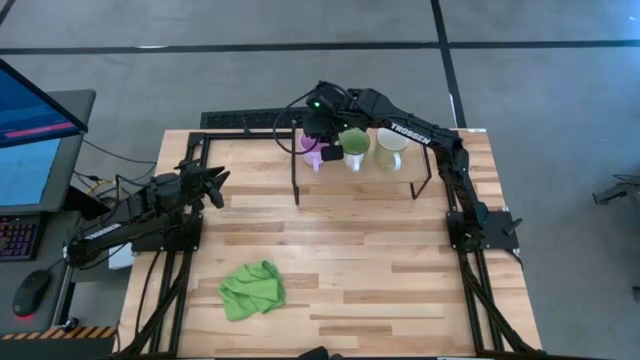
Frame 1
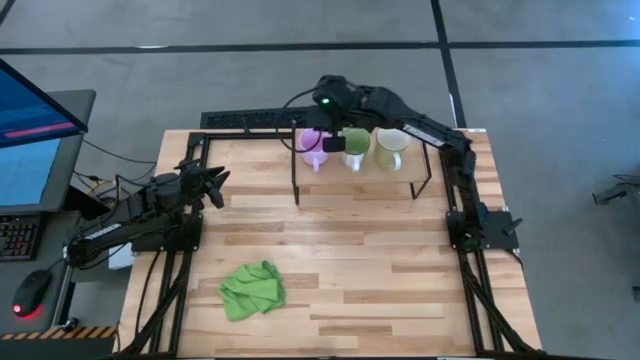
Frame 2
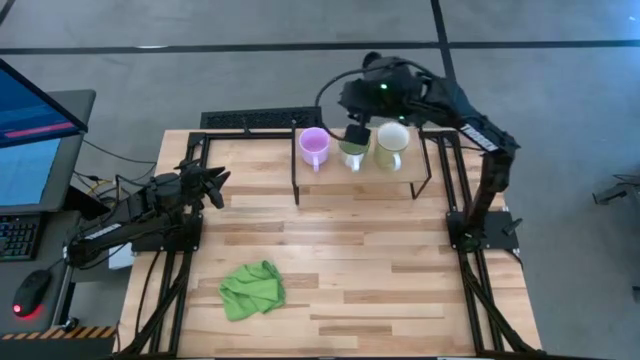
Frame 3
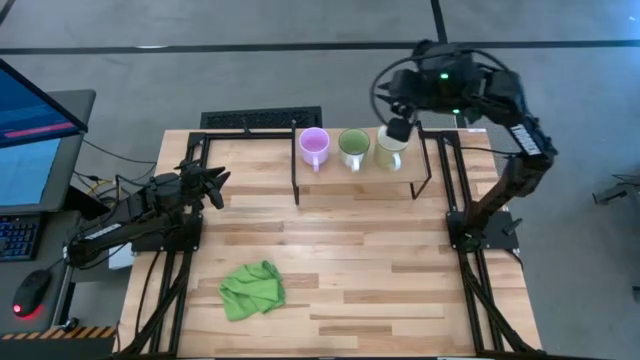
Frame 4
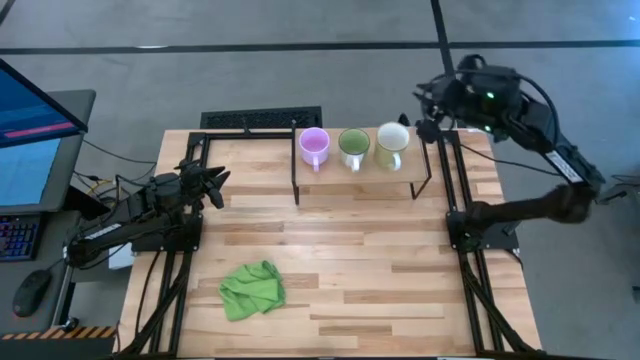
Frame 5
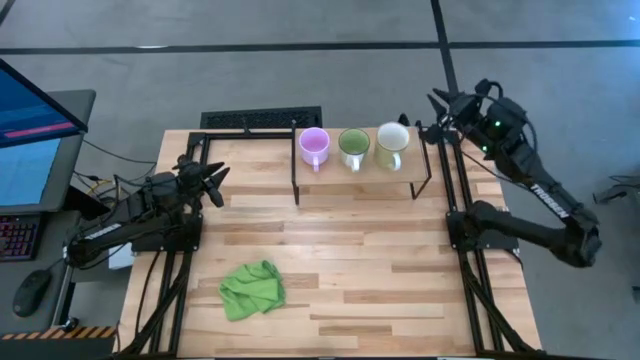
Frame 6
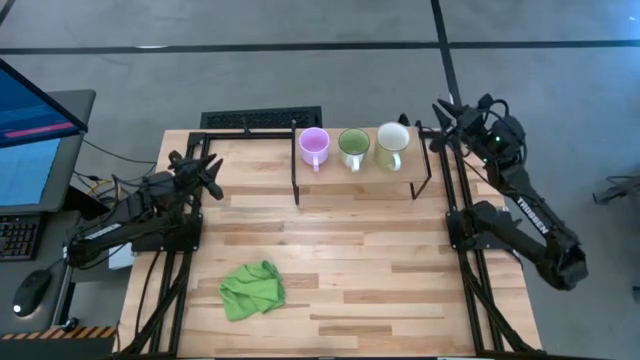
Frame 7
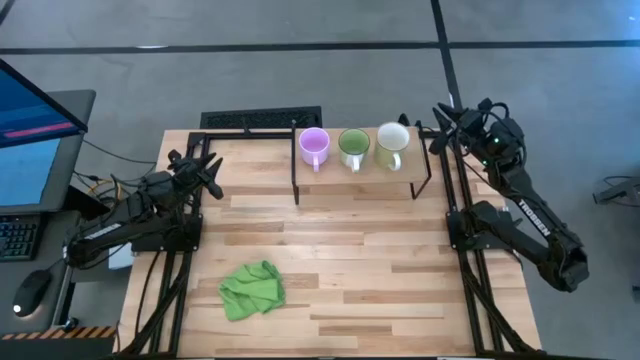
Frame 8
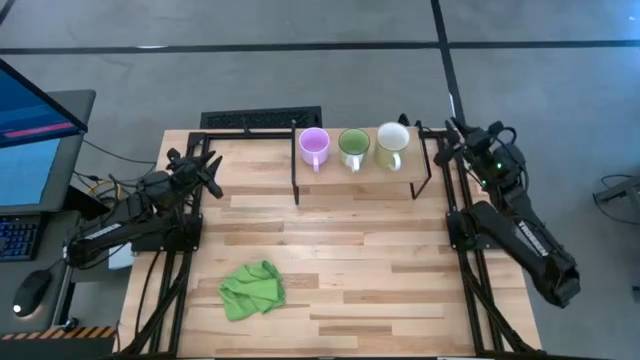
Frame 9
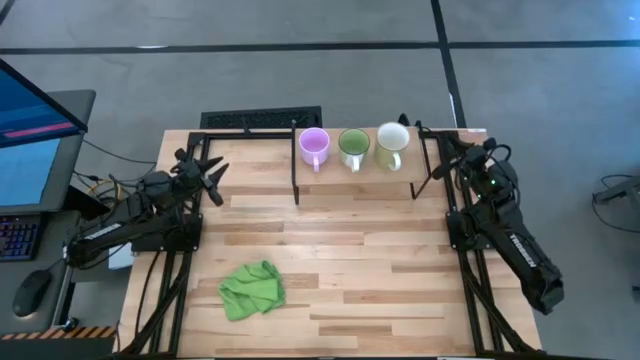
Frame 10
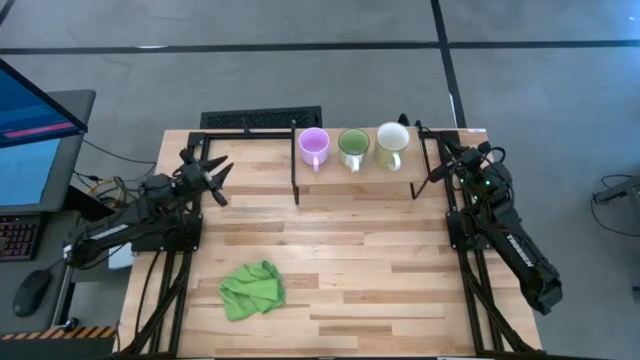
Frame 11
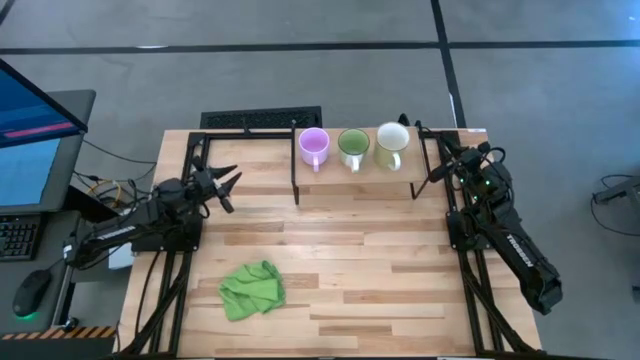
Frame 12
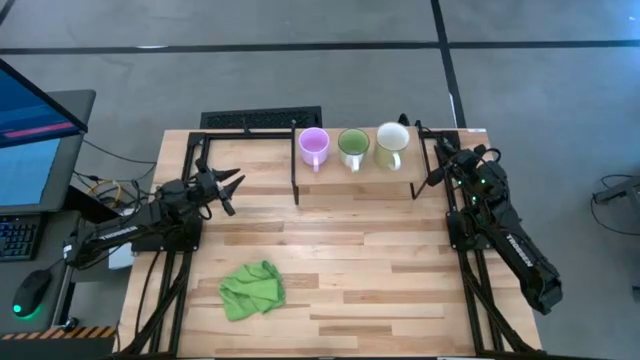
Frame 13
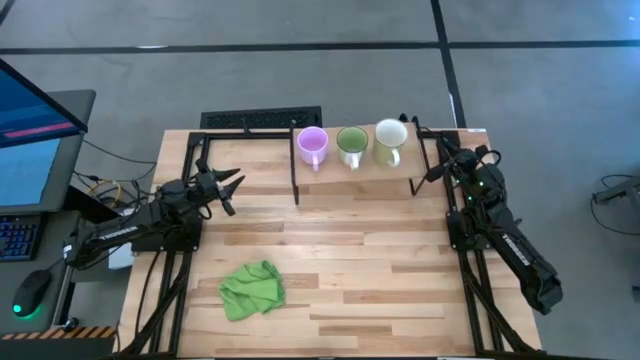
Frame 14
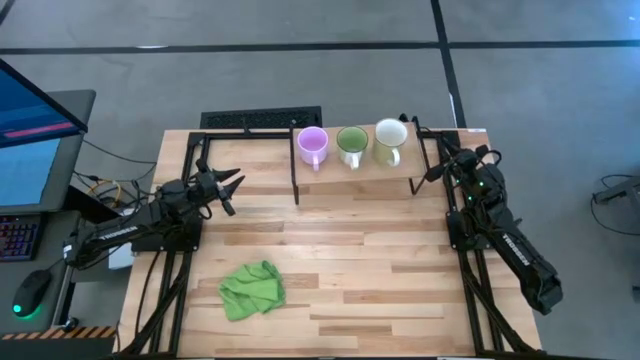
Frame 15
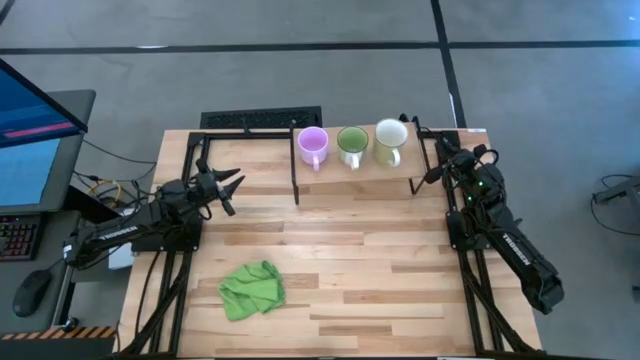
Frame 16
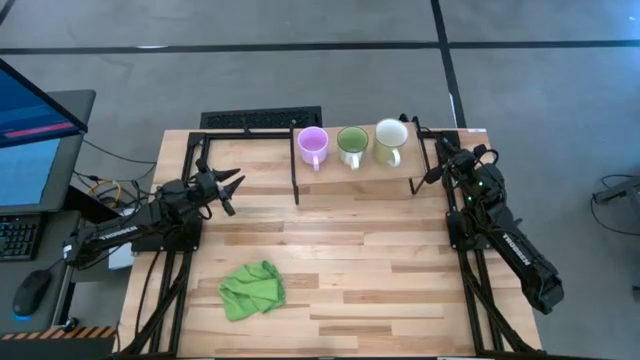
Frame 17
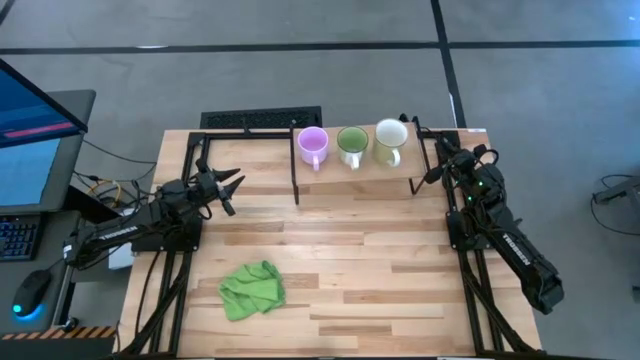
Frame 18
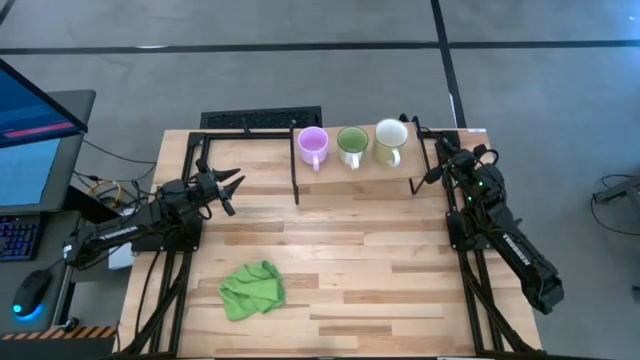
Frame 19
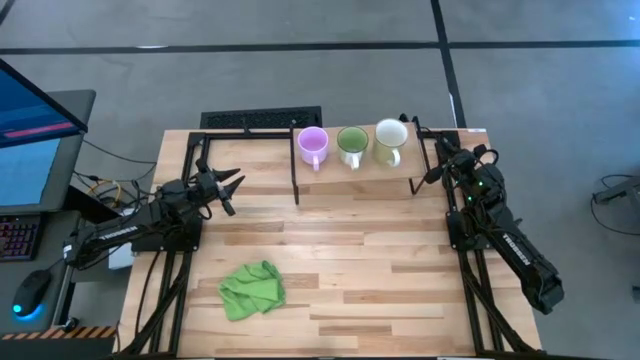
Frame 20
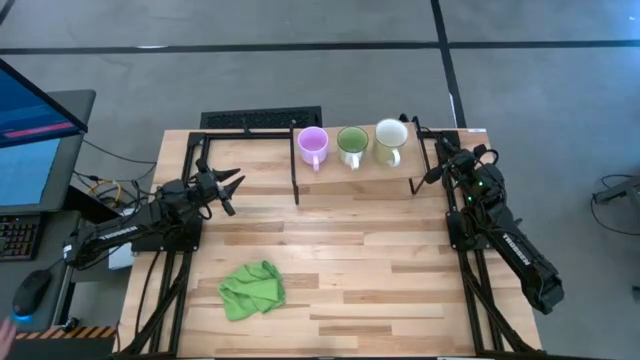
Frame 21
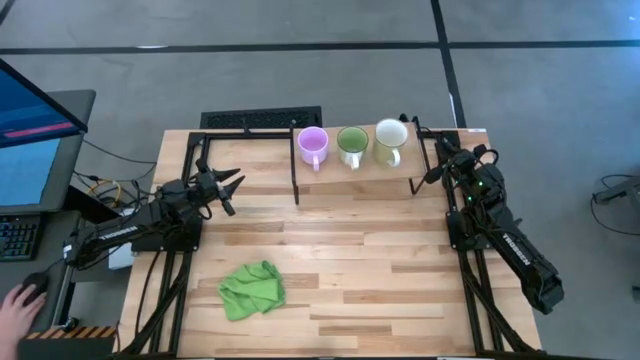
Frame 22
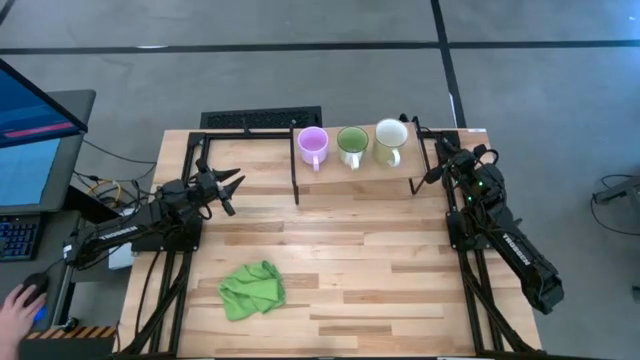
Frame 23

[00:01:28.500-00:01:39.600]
Task: Stack small to large cups/mugs on shelf
Return to Home Position

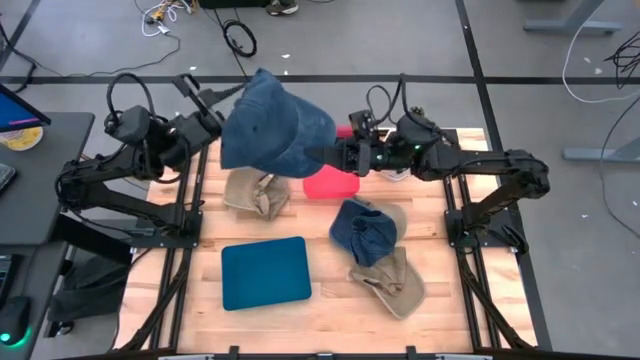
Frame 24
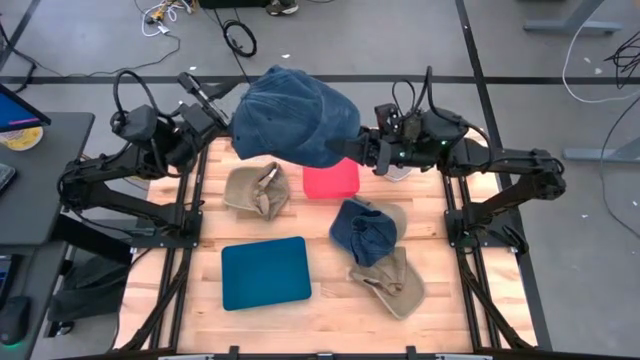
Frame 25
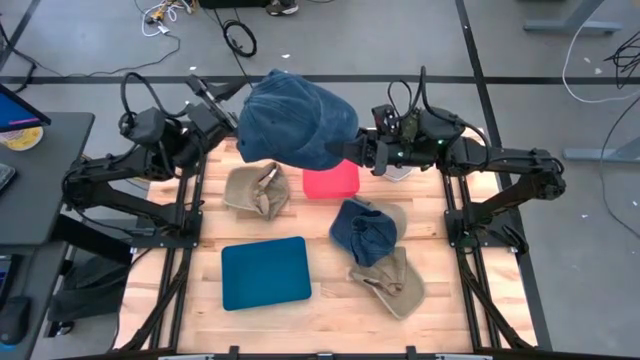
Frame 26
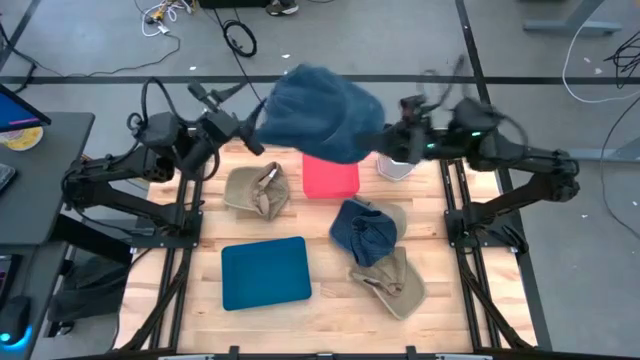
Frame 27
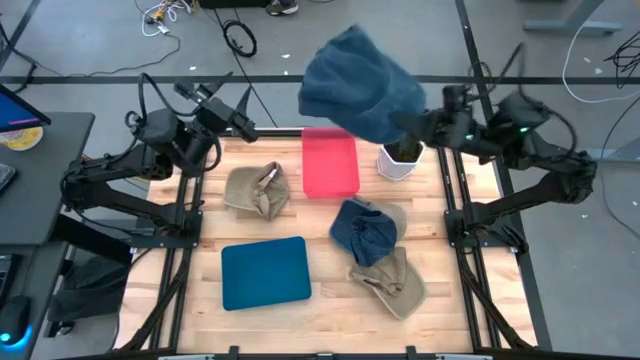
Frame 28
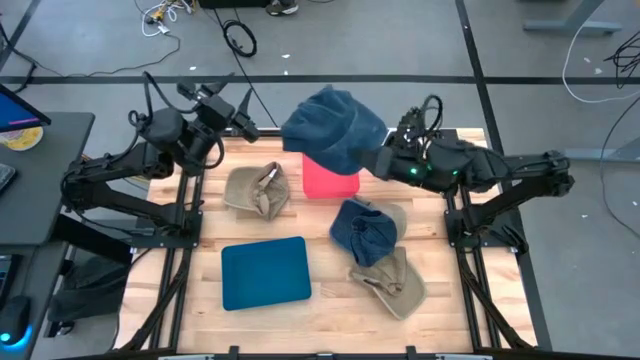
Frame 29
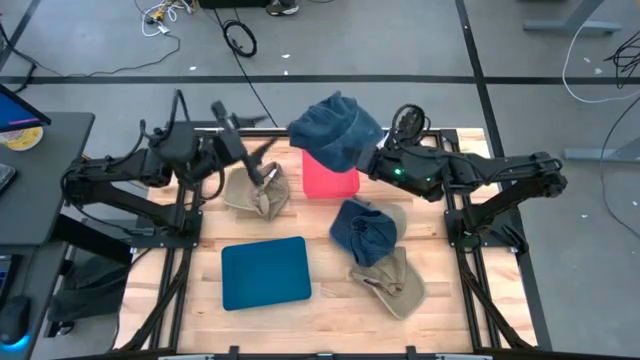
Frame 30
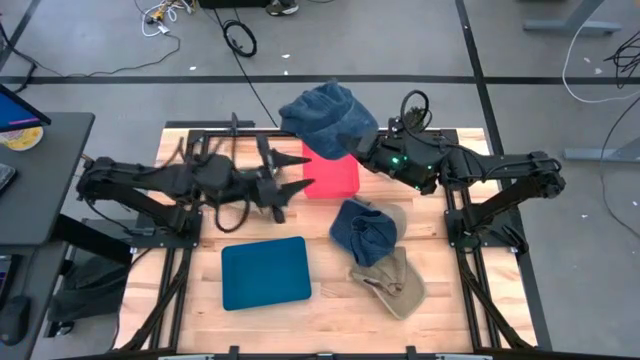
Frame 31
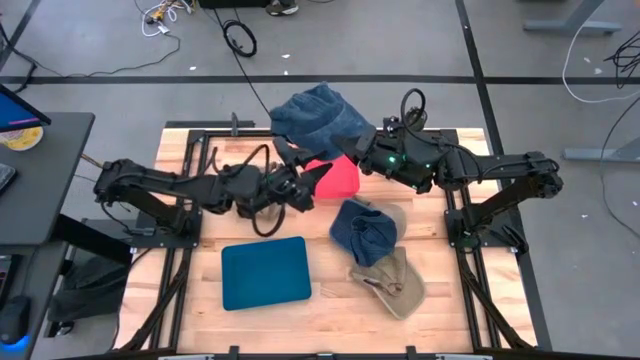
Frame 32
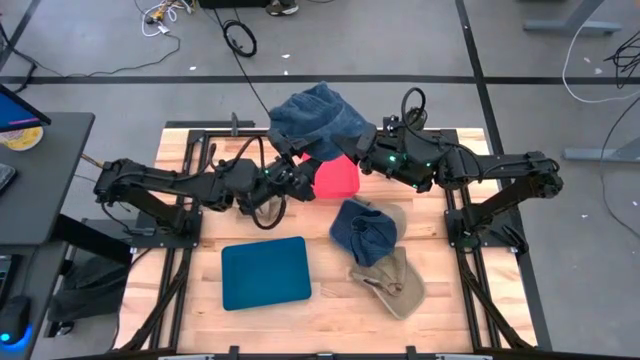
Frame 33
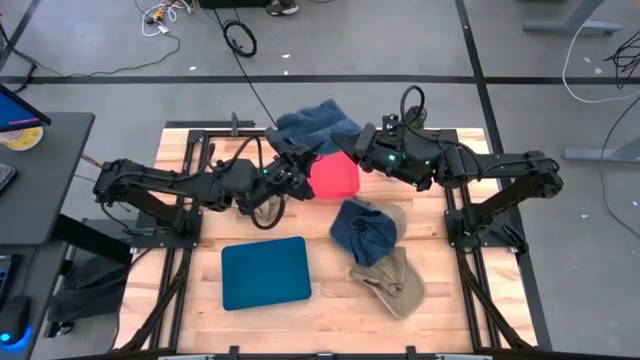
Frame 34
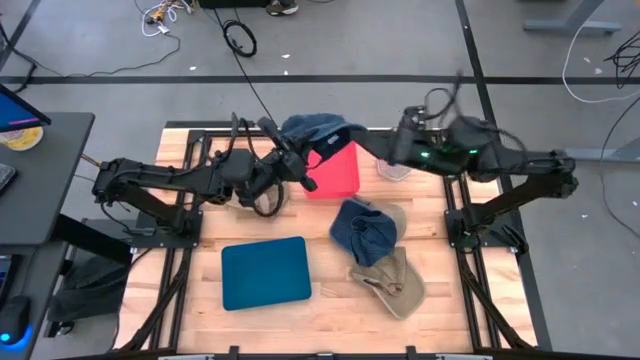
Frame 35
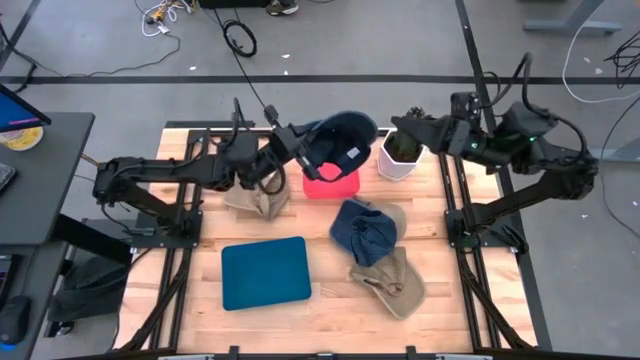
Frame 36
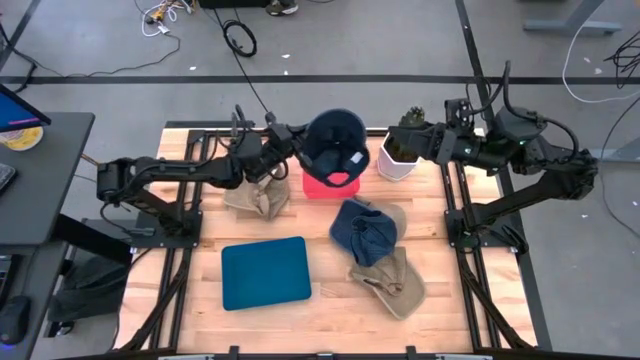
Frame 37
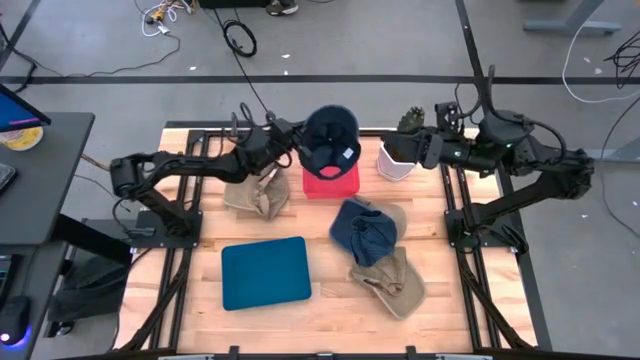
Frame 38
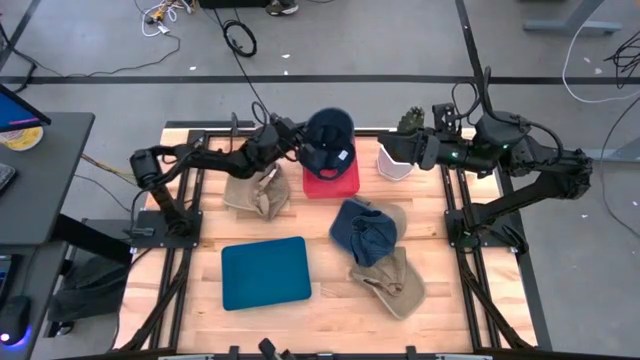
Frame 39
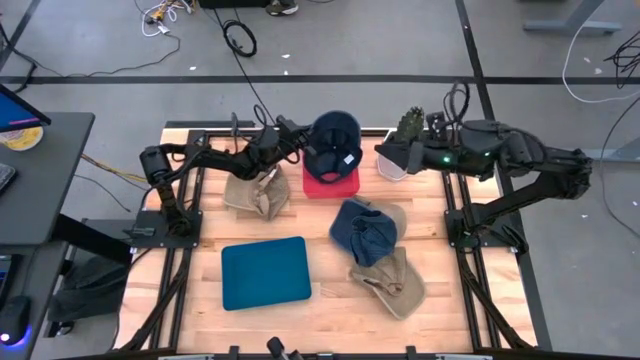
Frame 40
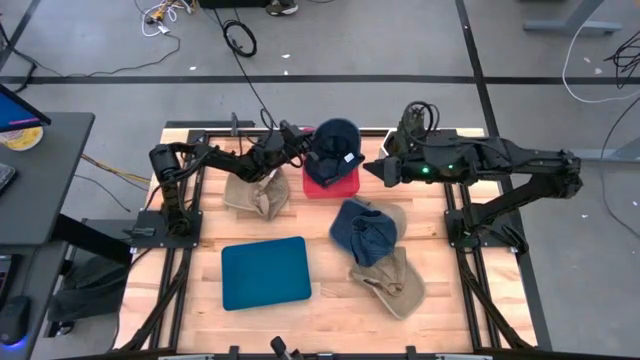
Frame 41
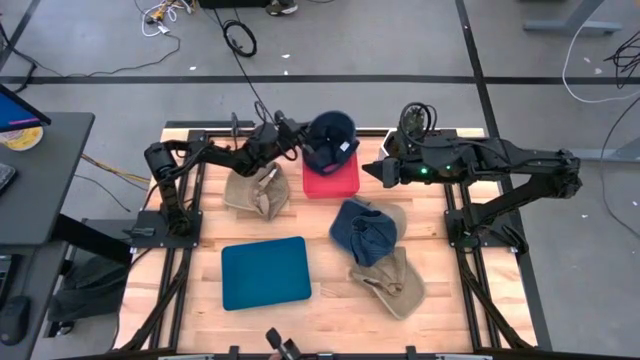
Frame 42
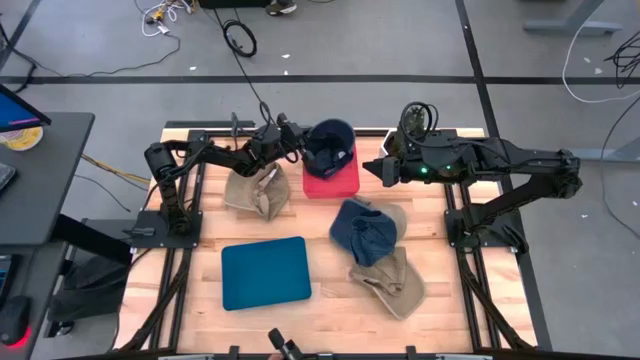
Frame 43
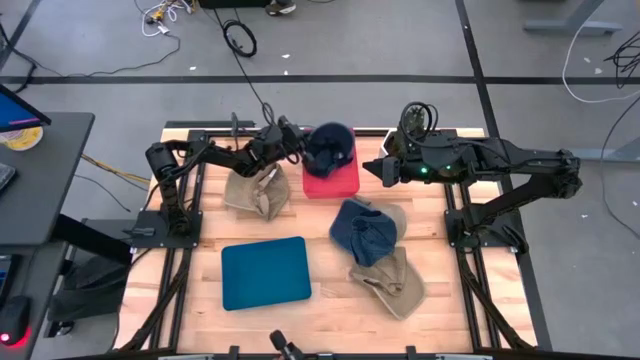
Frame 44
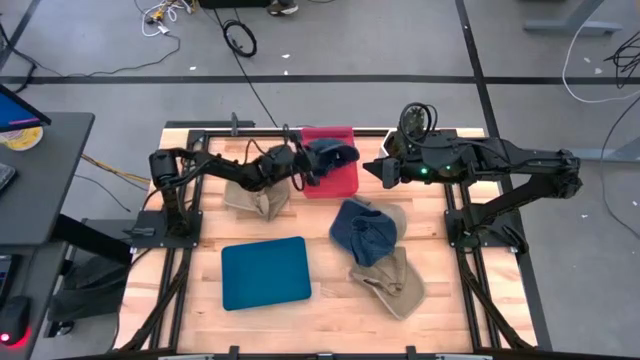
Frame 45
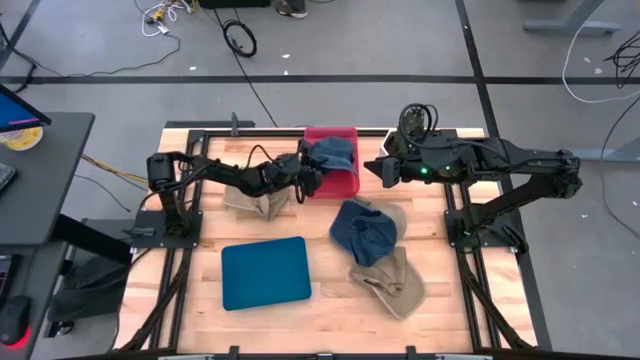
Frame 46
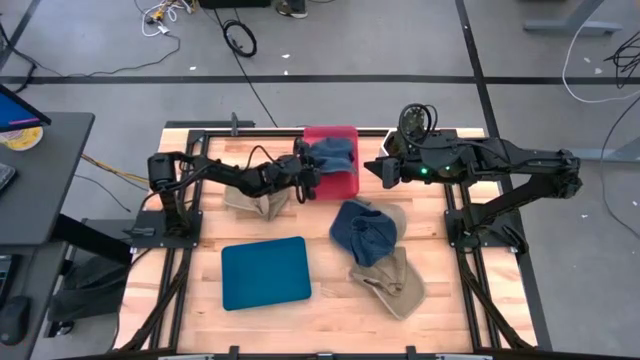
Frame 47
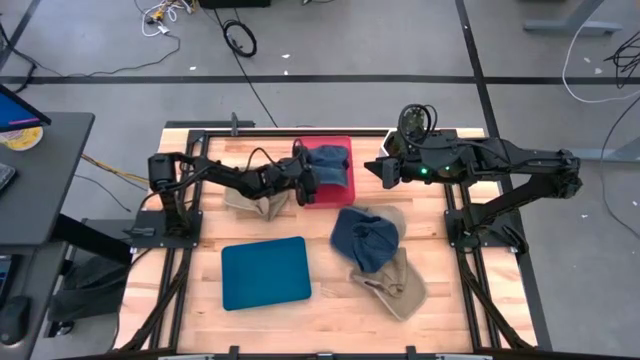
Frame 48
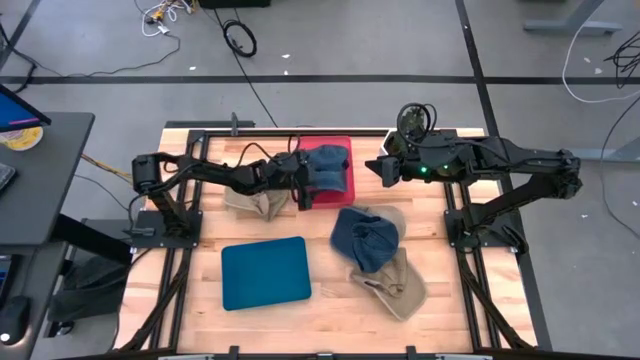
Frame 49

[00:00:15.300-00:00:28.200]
Task: Pick & Place hat
Put the top blue cap into the pink bin
